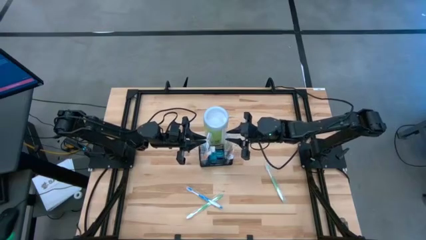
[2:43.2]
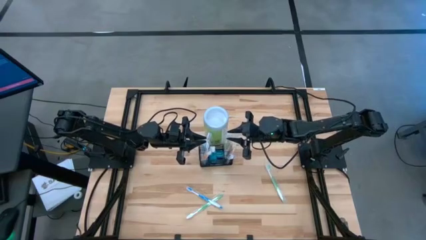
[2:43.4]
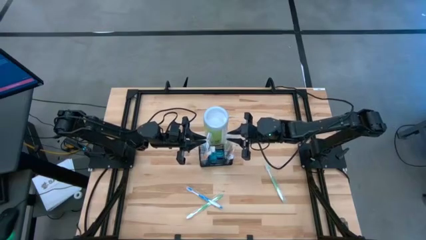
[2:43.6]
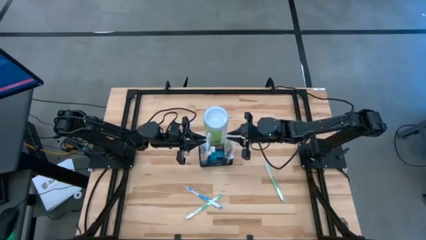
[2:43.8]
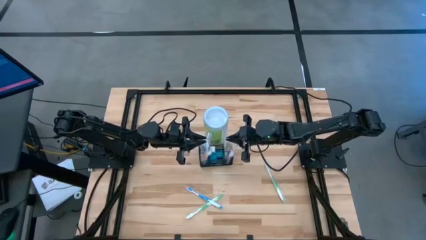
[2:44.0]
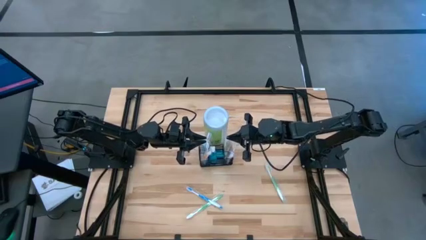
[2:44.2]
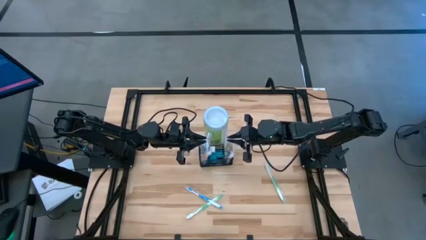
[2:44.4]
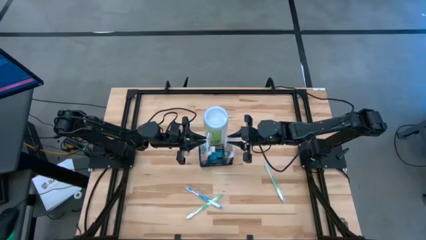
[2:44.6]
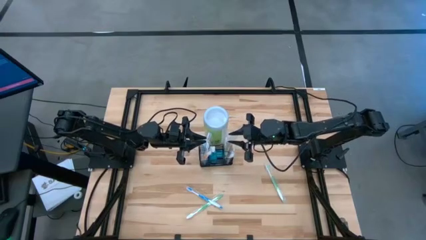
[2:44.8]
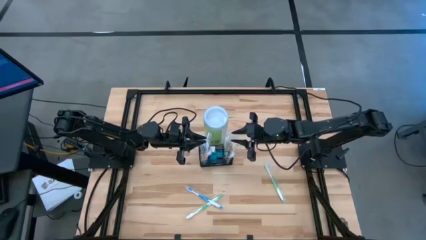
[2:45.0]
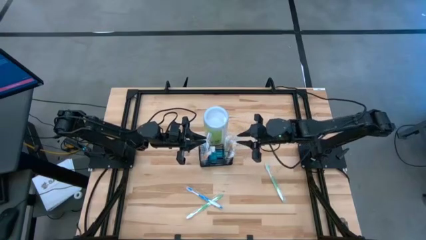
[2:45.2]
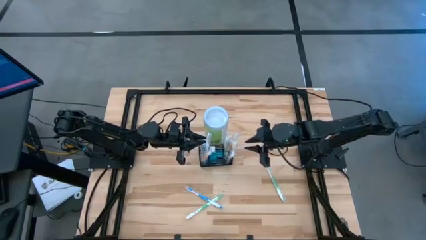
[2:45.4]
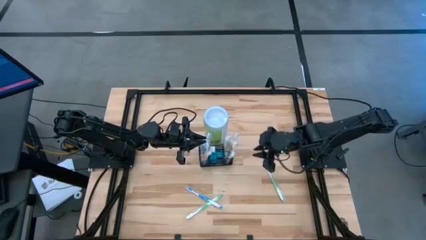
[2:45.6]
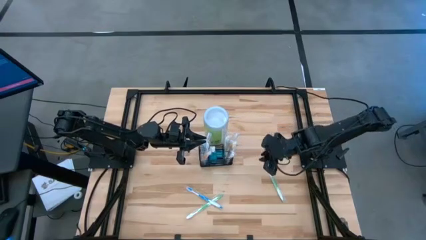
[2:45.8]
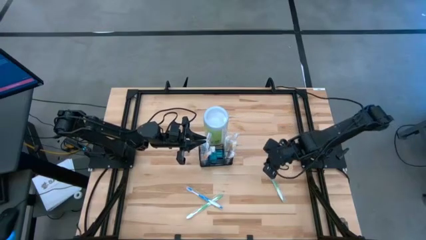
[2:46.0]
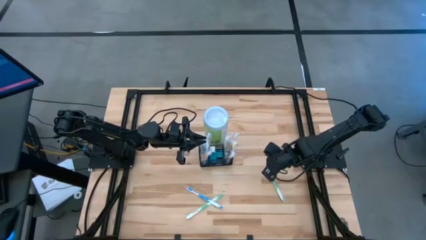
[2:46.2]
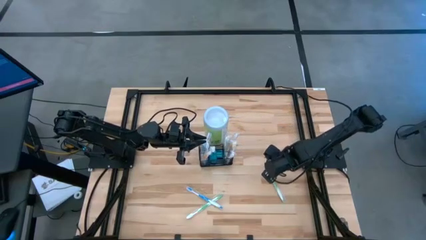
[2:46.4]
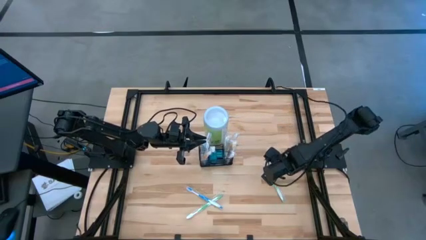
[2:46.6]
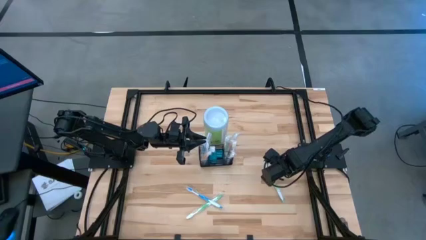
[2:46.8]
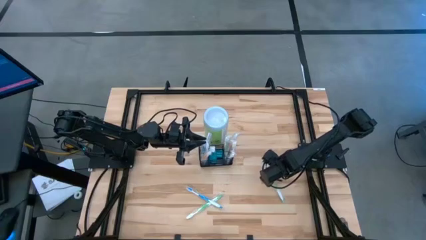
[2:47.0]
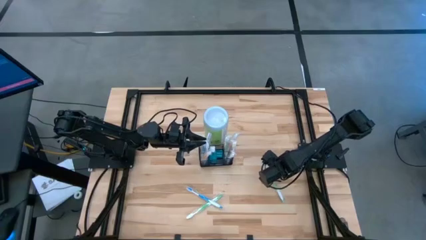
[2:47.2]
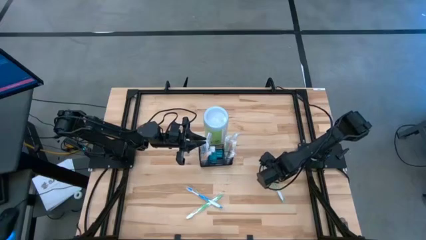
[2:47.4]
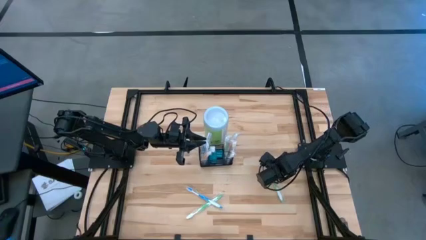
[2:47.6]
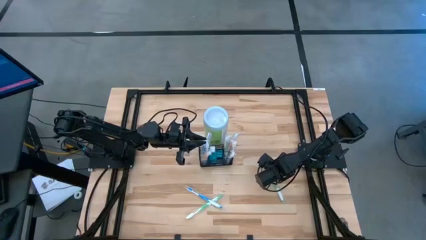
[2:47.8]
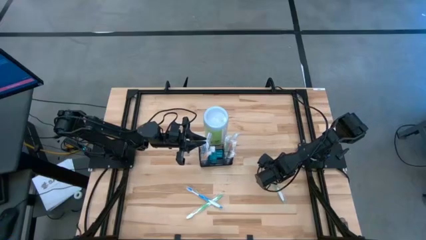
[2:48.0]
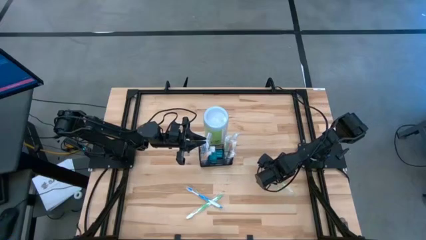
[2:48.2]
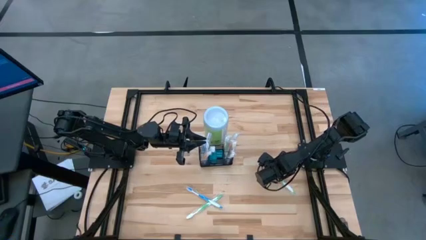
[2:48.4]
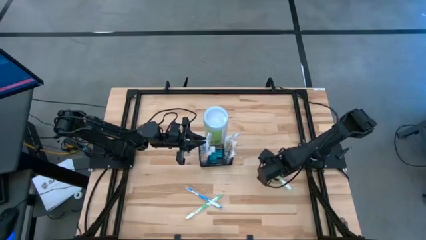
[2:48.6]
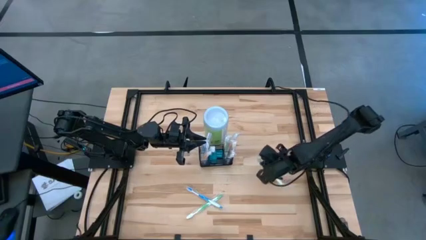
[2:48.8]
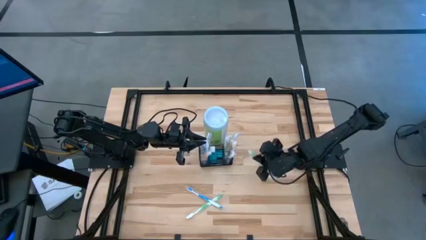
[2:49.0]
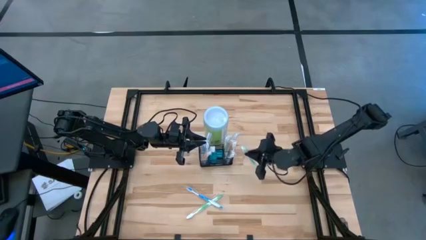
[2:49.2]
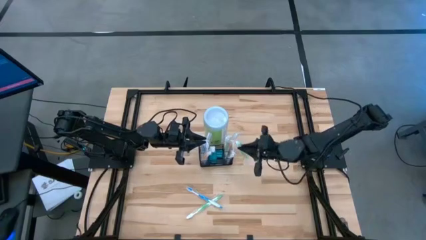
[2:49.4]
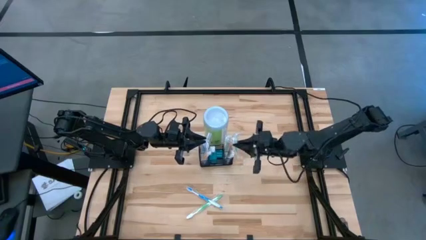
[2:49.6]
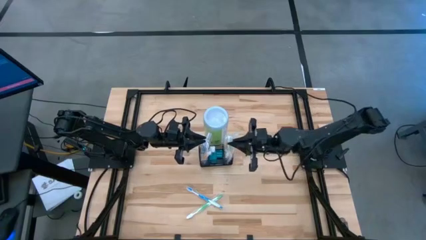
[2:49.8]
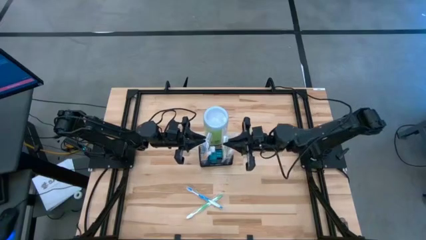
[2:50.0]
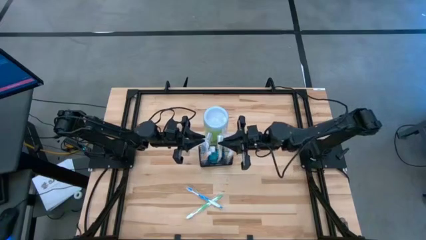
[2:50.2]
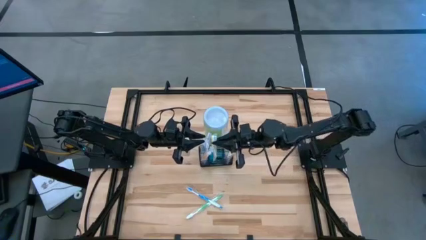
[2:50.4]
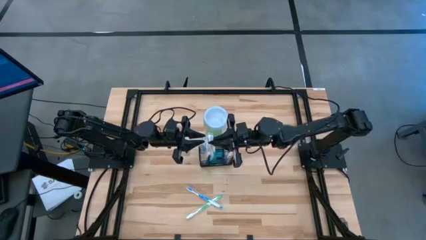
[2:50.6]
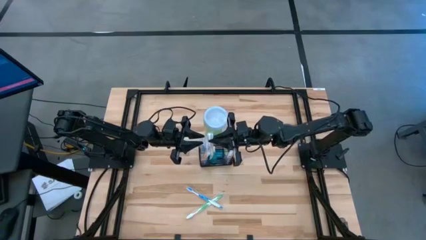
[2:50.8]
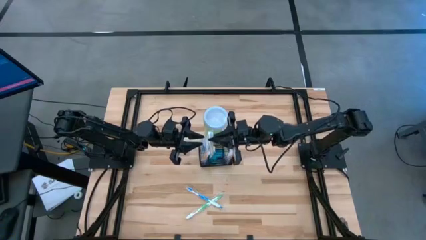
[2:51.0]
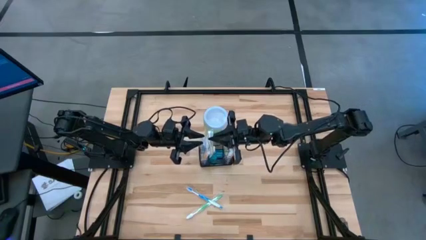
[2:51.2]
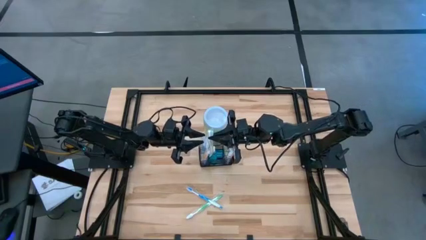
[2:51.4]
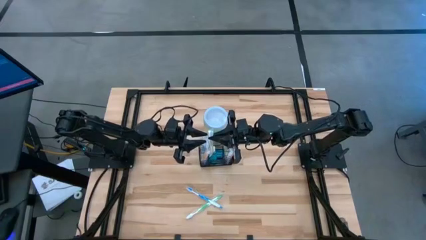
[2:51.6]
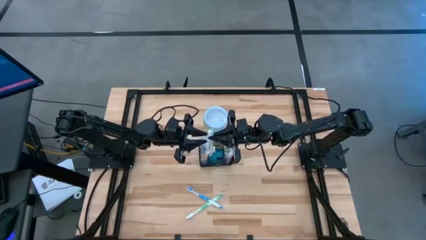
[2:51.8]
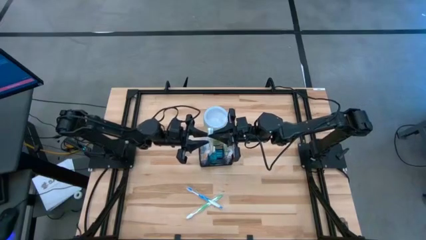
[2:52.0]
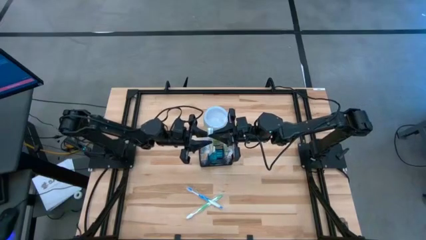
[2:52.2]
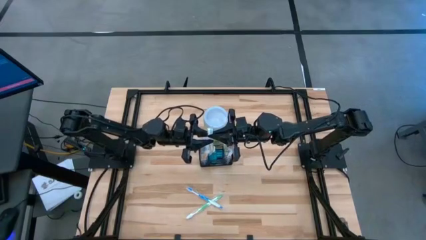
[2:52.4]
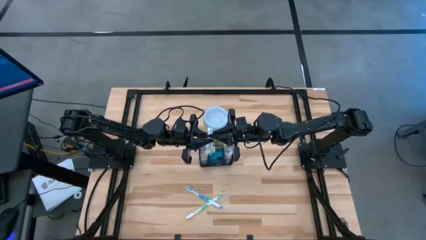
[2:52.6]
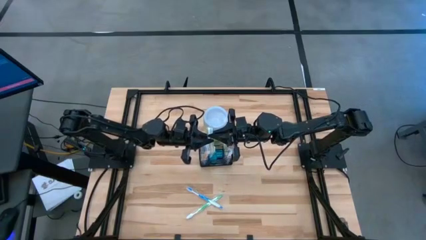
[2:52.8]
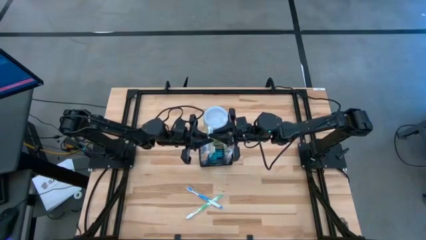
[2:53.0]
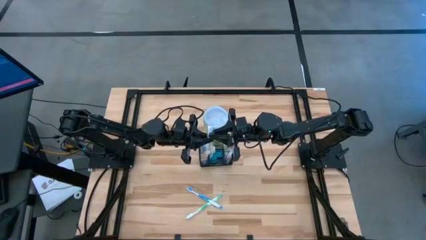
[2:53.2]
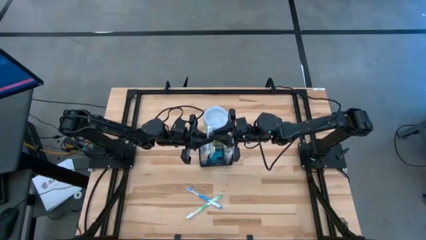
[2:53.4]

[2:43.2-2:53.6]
Task: Pick & Place toothbrushing station
Put the right green toothbrush into the wire organizer

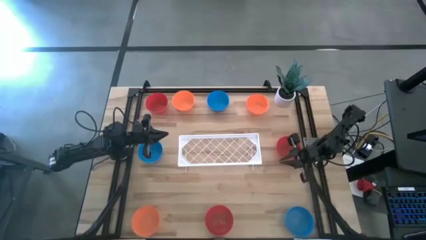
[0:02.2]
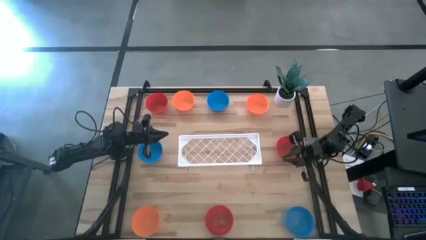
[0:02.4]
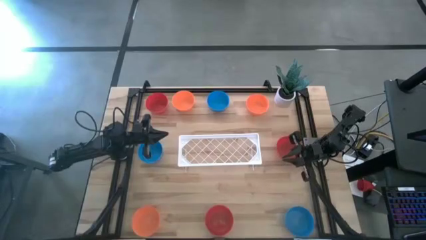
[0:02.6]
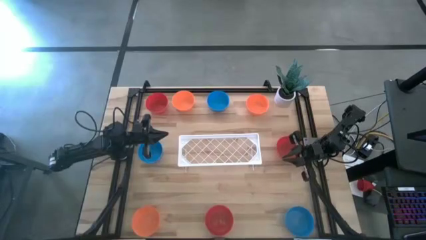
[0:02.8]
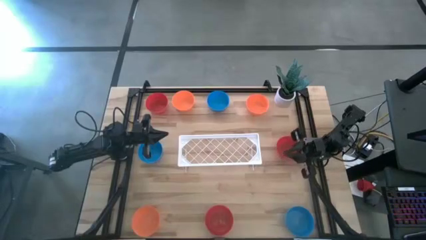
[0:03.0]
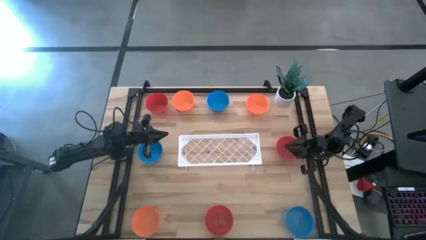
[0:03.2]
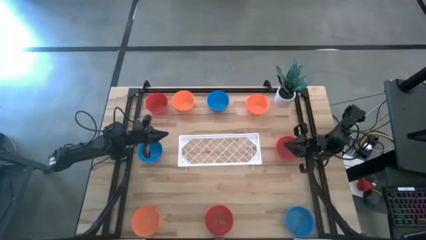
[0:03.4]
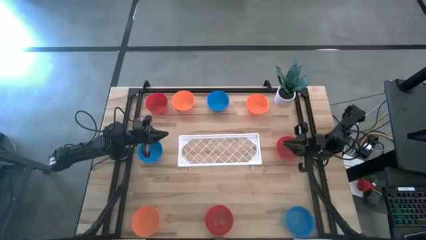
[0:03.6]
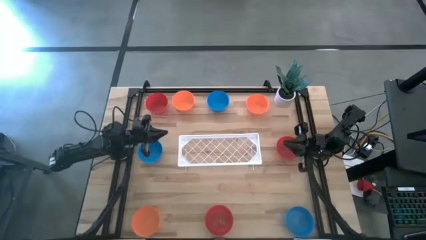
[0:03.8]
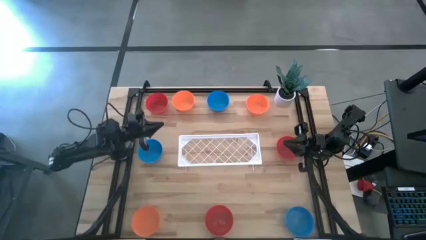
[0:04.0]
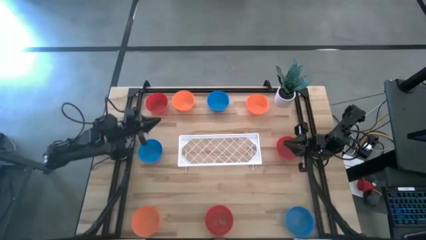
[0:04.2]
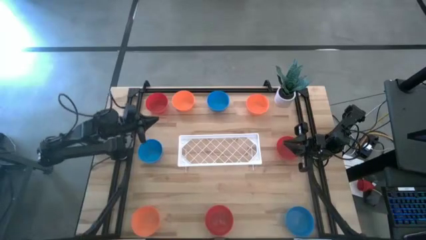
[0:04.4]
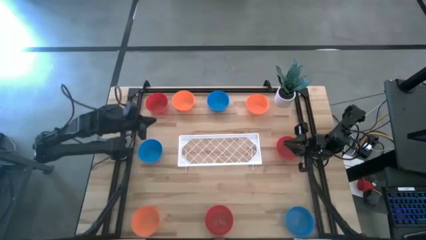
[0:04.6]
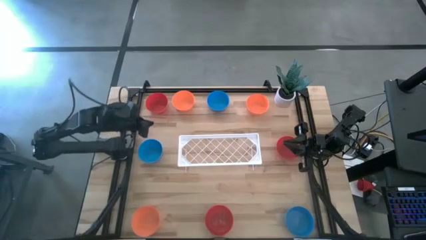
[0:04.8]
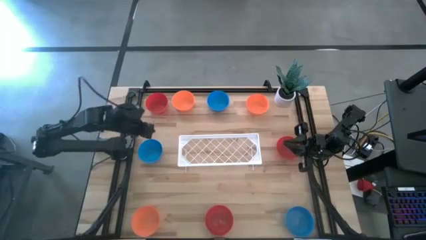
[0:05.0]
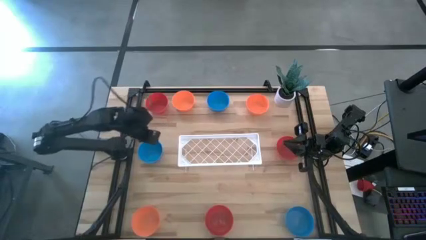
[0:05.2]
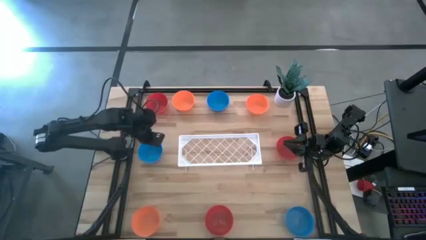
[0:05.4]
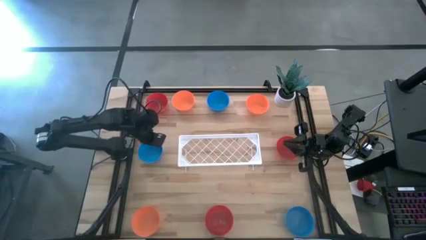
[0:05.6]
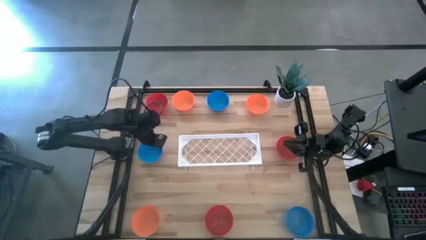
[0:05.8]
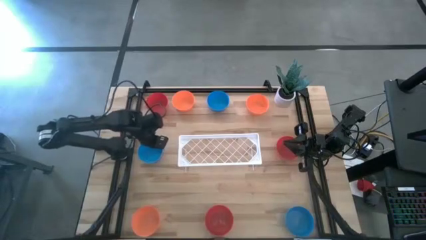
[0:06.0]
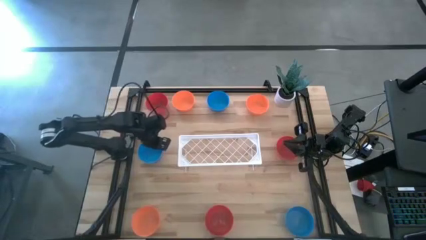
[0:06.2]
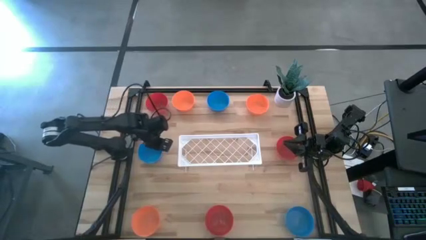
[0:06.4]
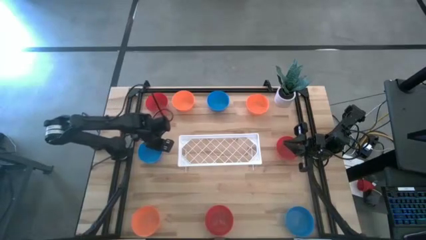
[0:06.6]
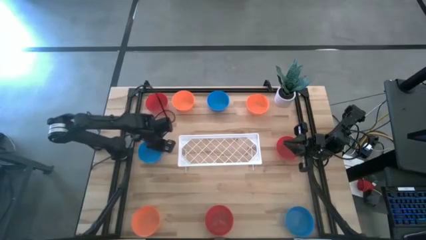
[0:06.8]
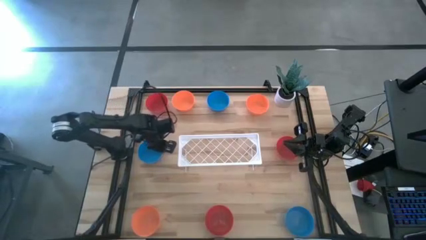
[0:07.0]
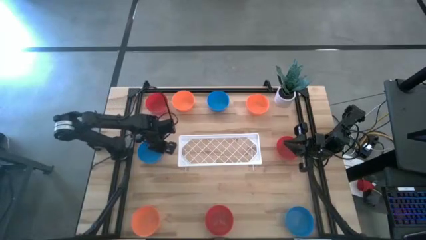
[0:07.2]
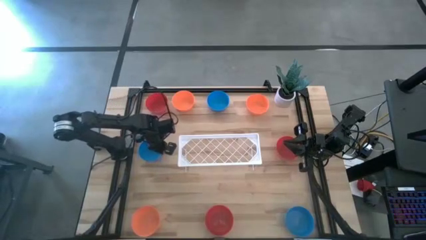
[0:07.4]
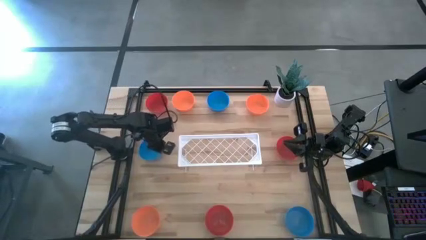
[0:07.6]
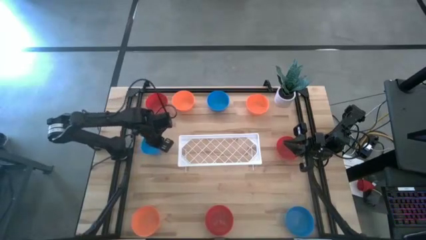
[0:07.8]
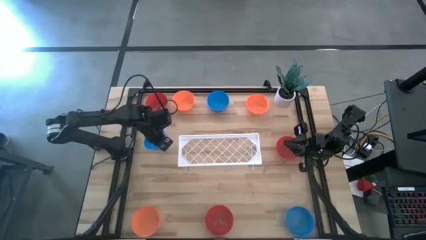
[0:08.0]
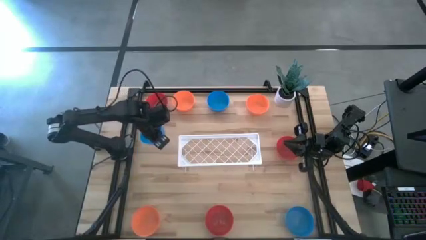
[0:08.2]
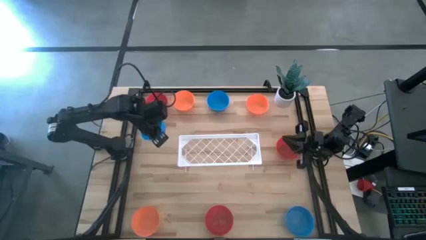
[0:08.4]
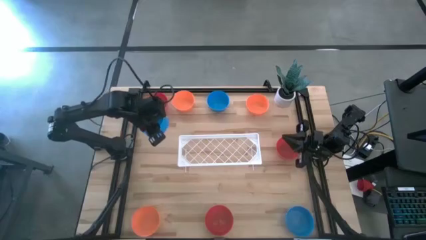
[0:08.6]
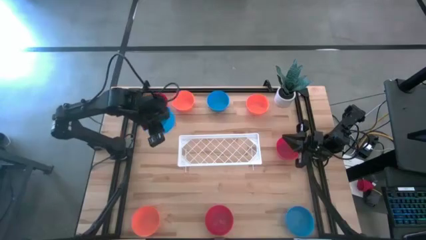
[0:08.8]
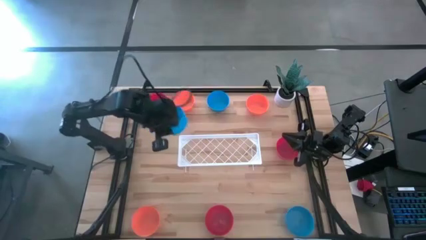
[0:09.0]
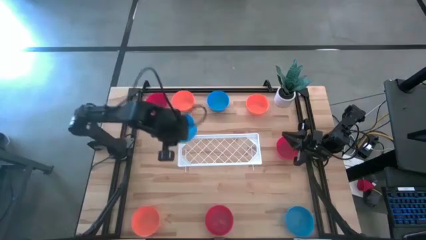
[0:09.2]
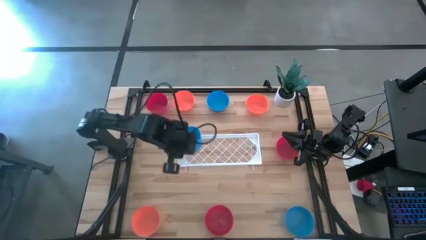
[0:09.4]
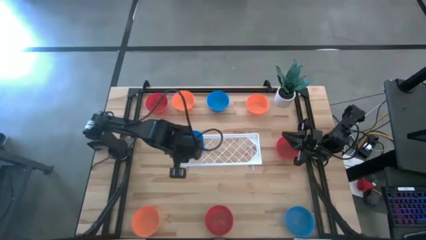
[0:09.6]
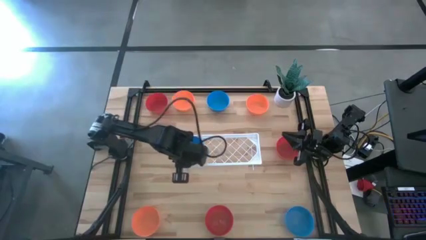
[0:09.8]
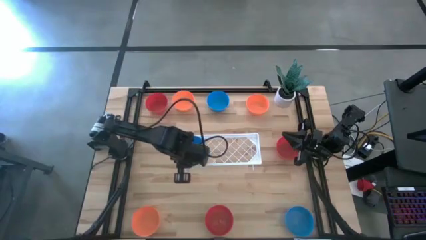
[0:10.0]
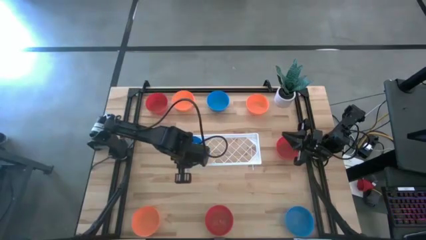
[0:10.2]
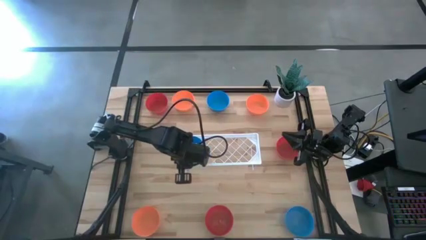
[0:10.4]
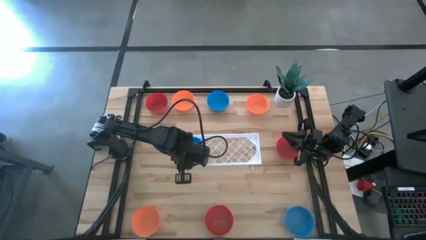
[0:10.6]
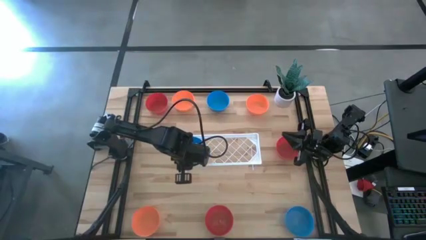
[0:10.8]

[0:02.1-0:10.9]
Task: Pick & Place Mini bowls
Put the middle blue bowl on the shelf
